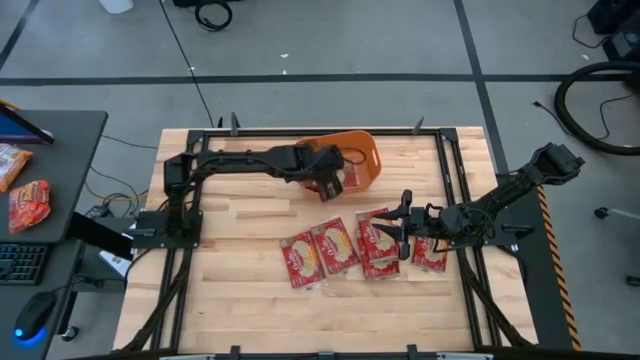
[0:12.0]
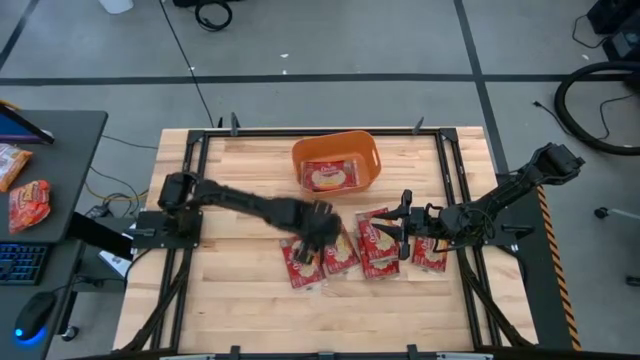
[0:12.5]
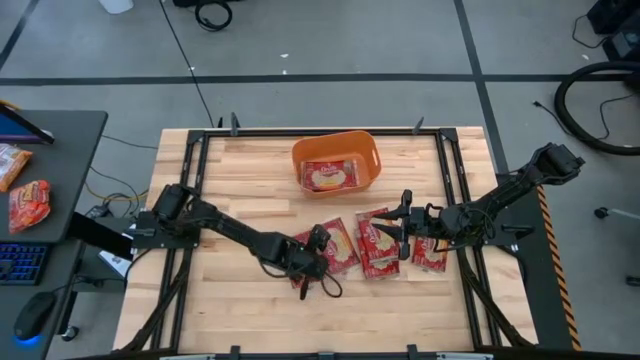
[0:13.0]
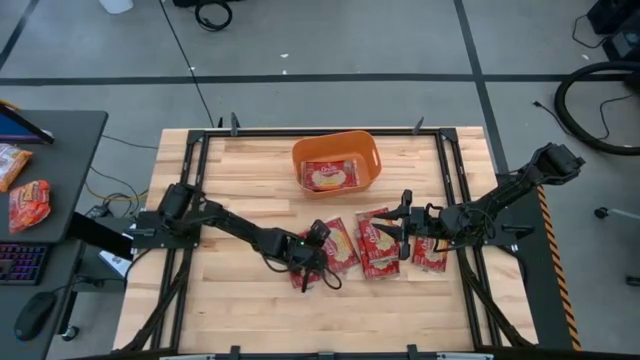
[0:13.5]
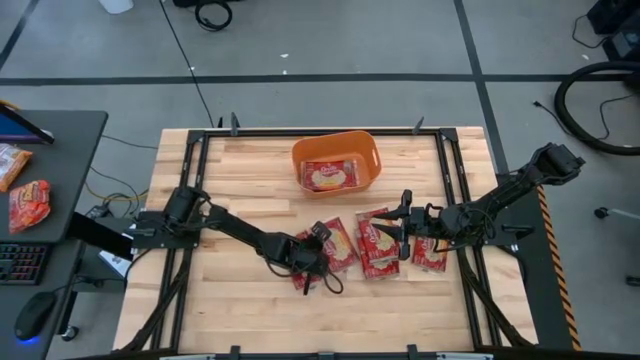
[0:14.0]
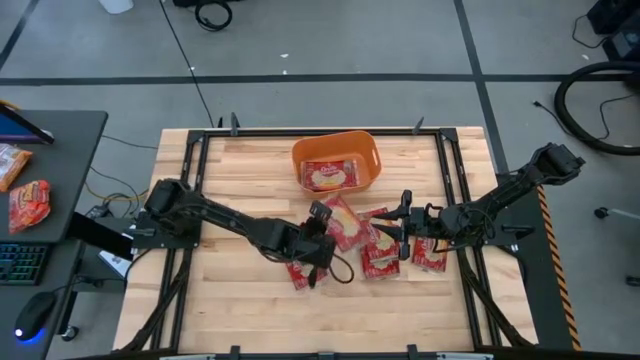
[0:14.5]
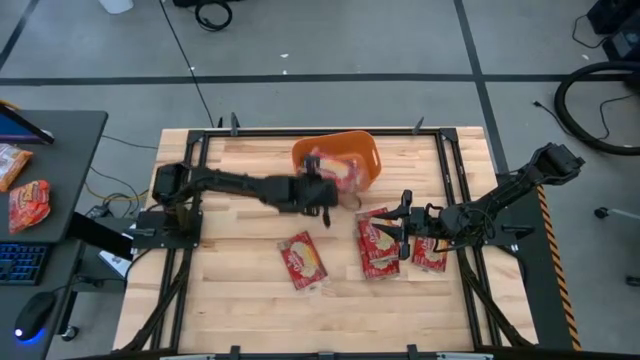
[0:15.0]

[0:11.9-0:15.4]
Task: Sort popcorn bags into baskets
Put the red popcorn bag into the orange bin

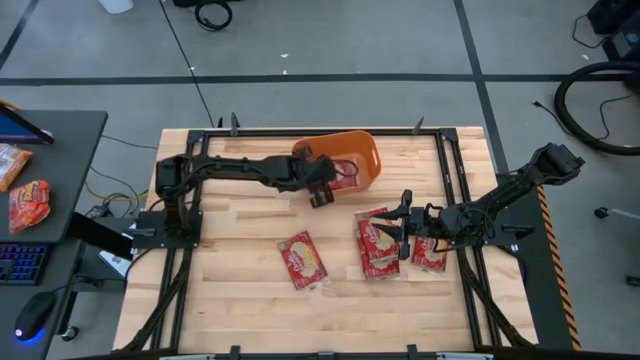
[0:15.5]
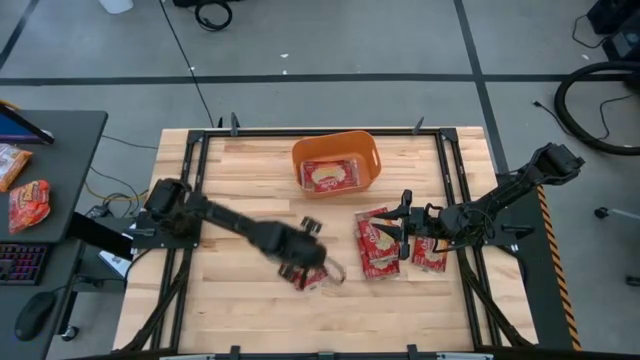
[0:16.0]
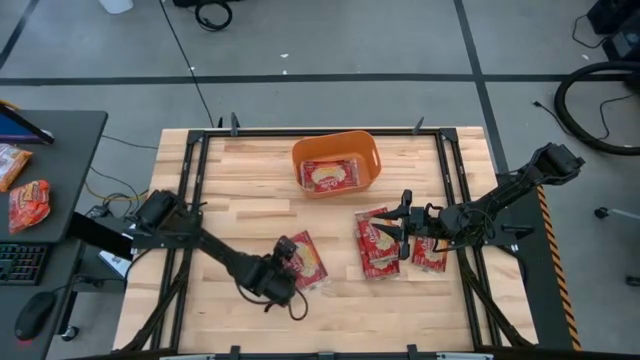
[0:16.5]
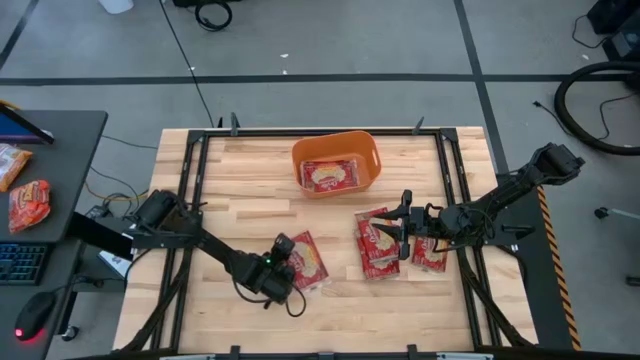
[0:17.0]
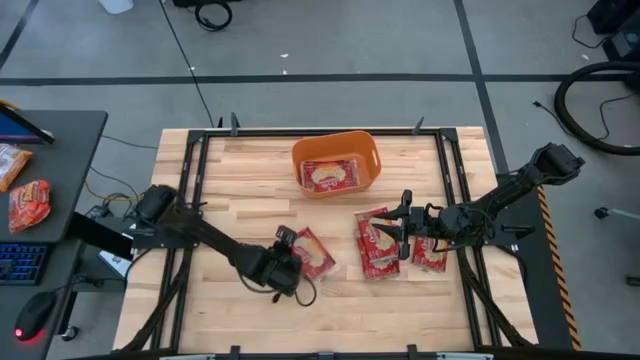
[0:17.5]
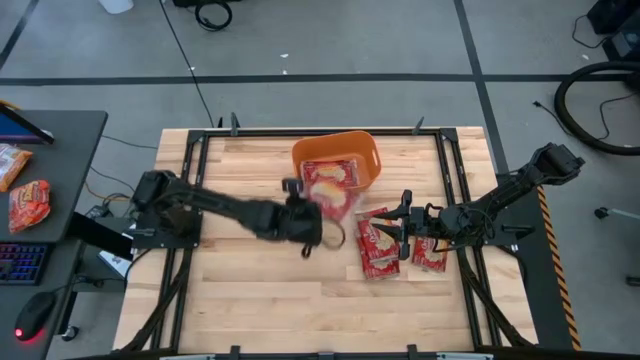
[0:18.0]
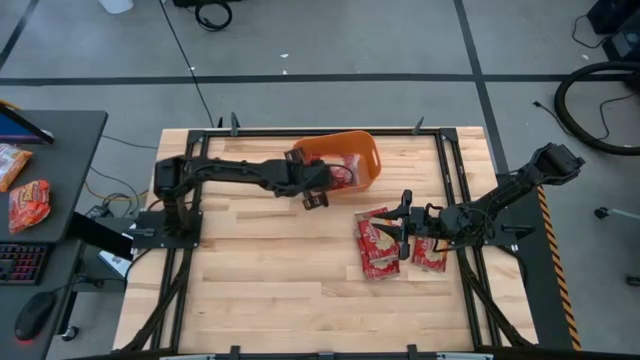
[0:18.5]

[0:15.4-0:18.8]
Put the red popcorn bag into the orange bin

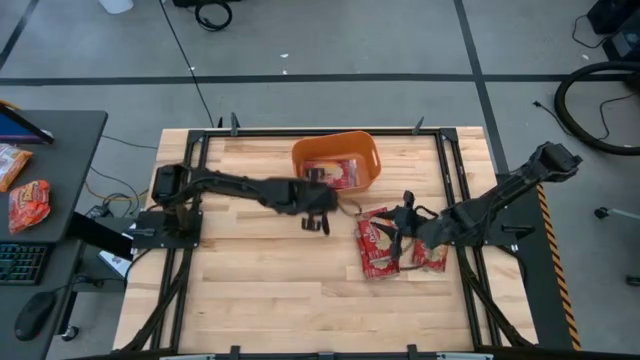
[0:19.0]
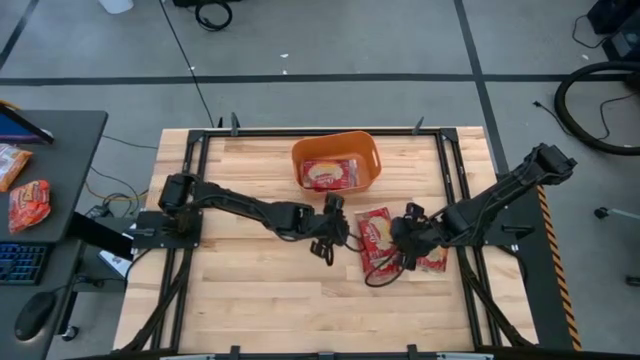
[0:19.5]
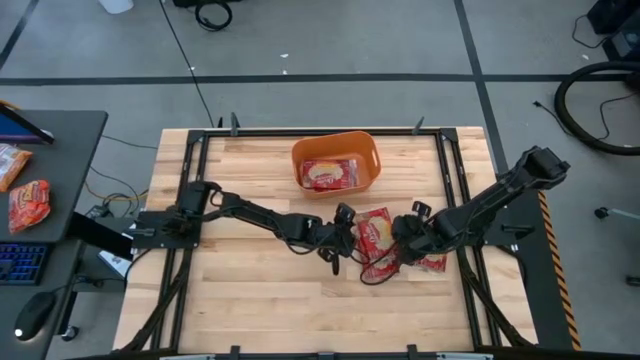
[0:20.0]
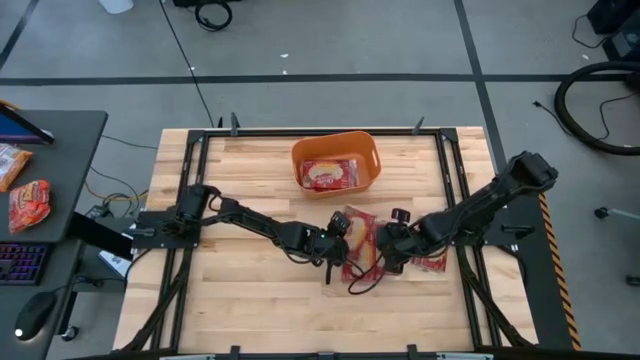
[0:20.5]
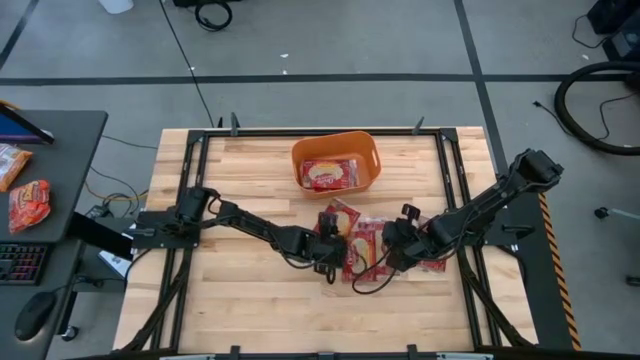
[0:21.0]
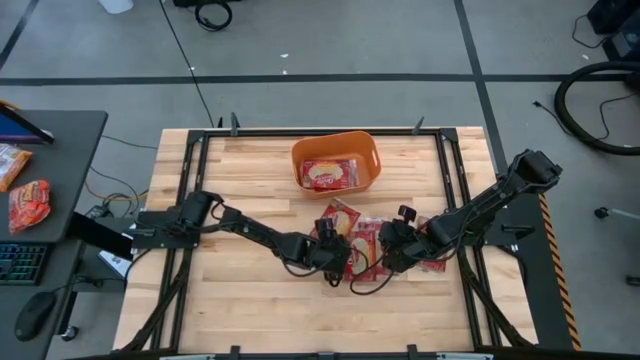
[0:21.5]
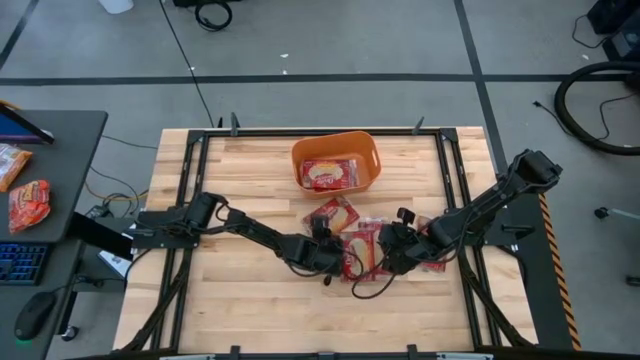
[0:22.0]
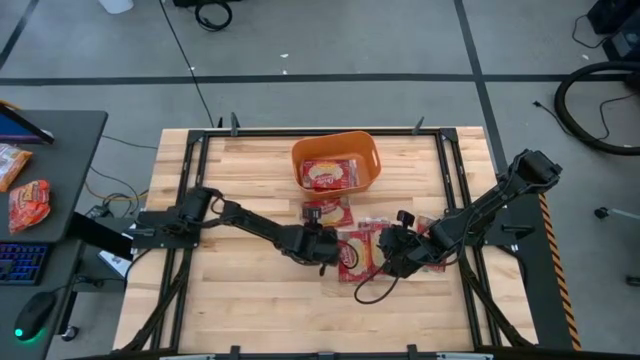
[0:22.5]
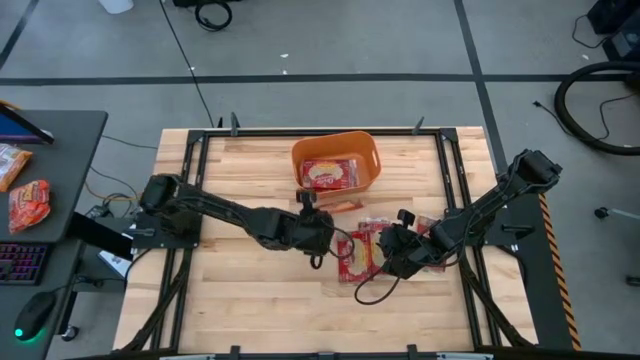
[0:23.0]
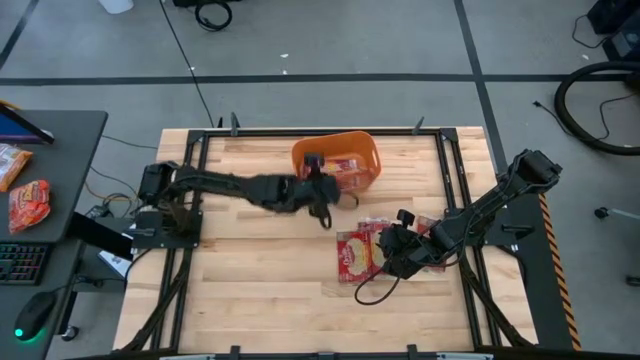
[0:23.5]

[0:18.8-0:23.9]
Put the red popcorn bag into the orange bin

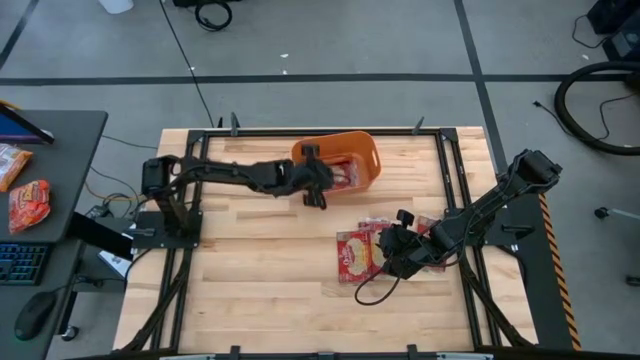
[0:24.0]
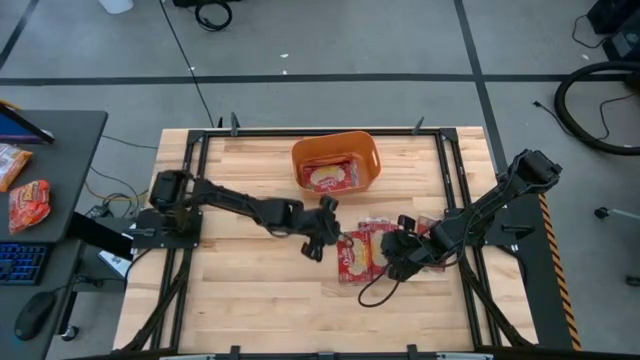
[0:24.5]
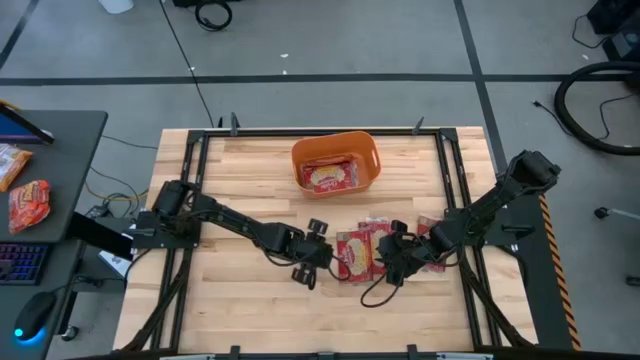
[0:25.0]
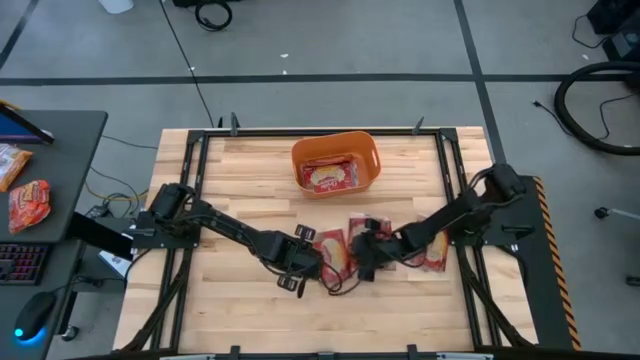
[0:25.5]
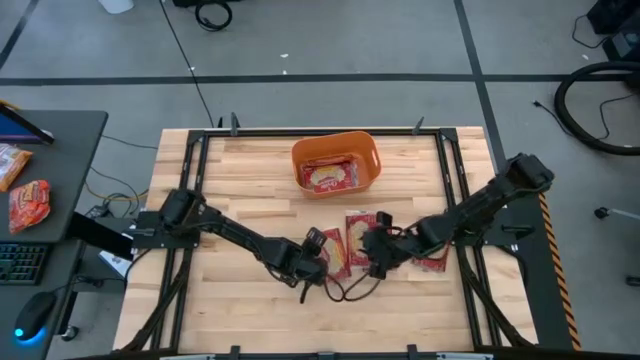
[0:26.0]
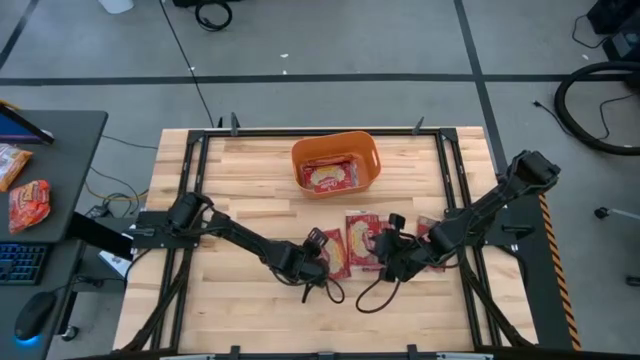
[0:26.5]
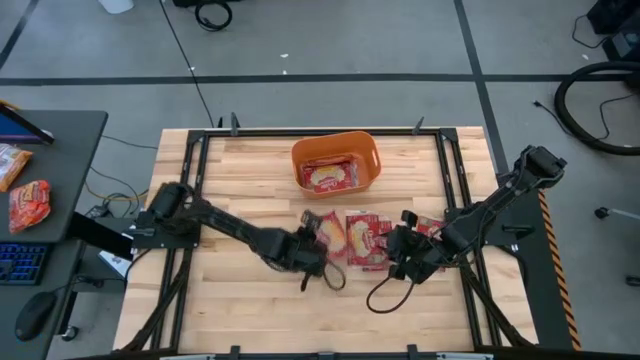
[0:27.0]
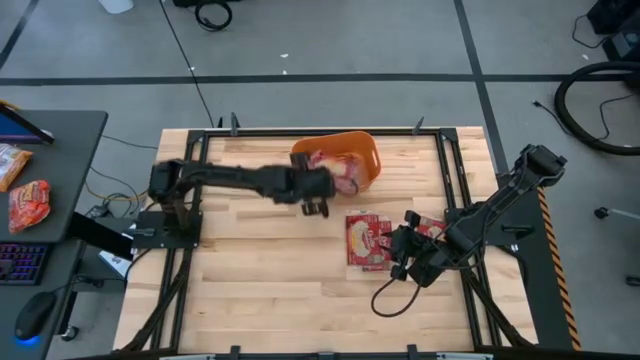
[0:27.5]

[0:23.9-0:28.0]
Put the red popcorn bag into the orange bin

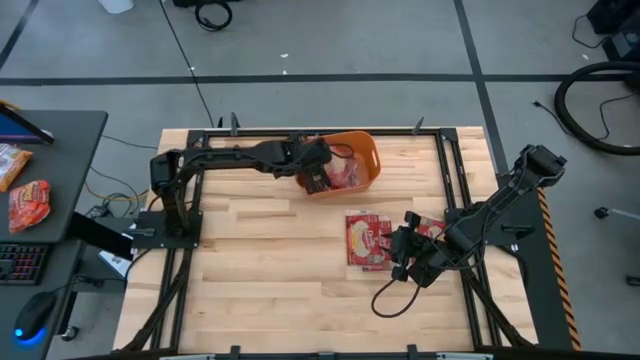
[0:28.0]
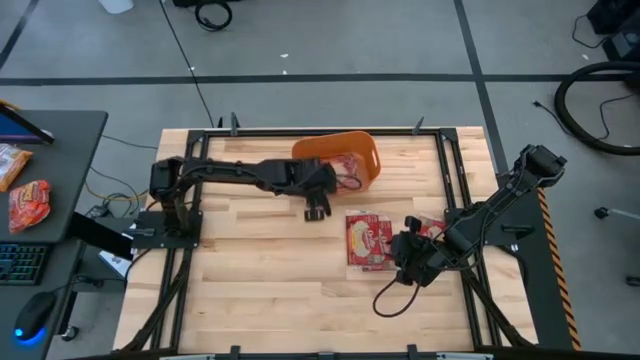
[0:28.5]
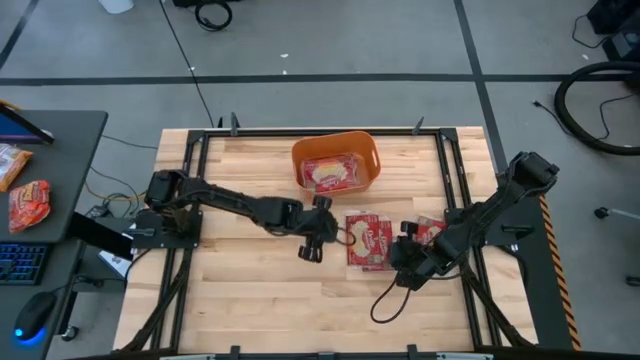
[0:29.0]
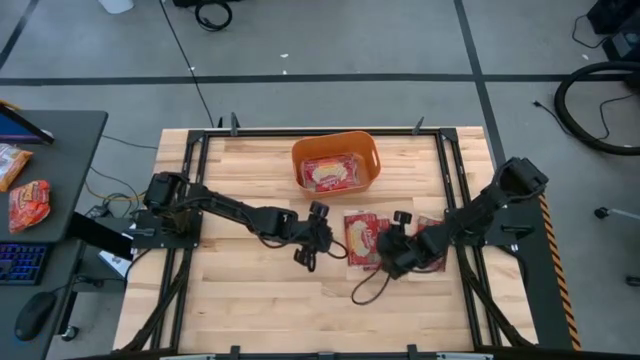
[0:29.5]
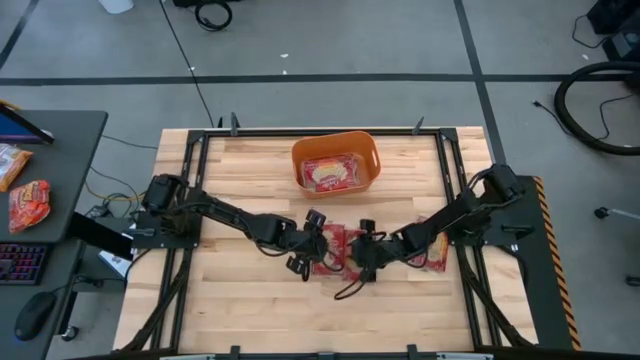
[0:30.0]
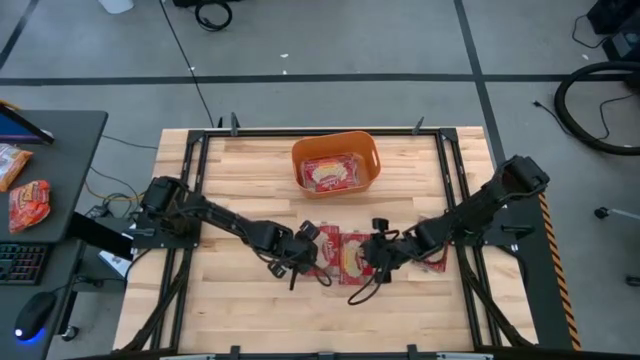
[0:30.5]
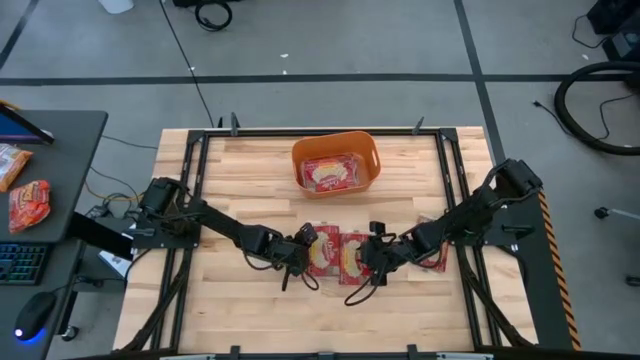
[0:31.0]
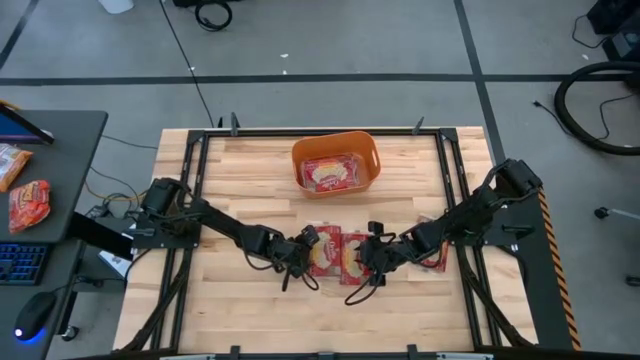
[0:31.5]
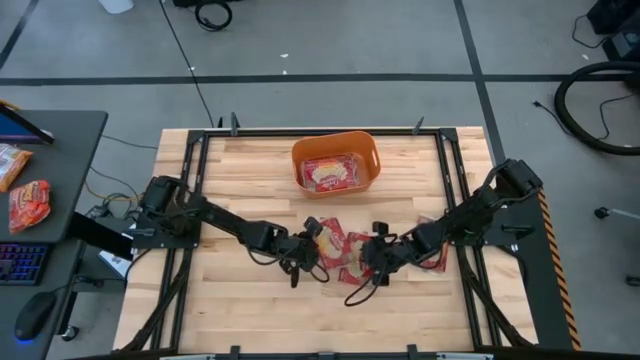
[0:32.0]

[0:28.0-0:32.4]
Put the red popcorn bag into the orange bin

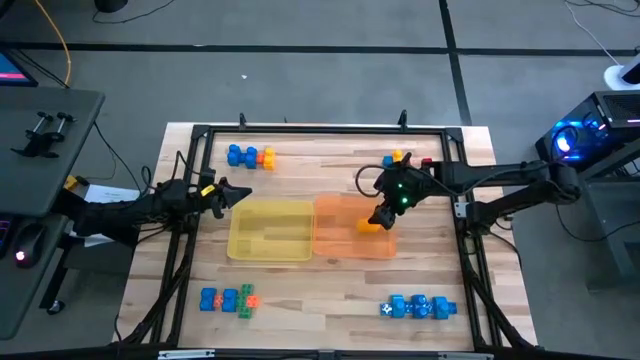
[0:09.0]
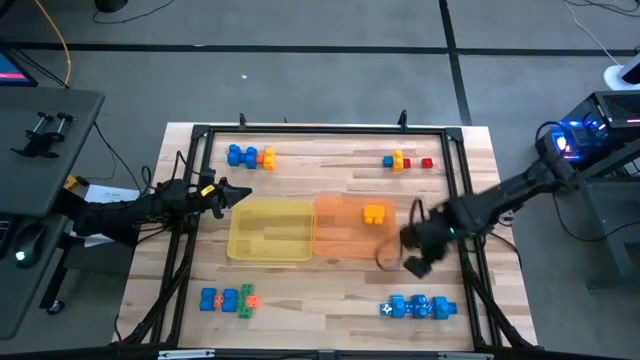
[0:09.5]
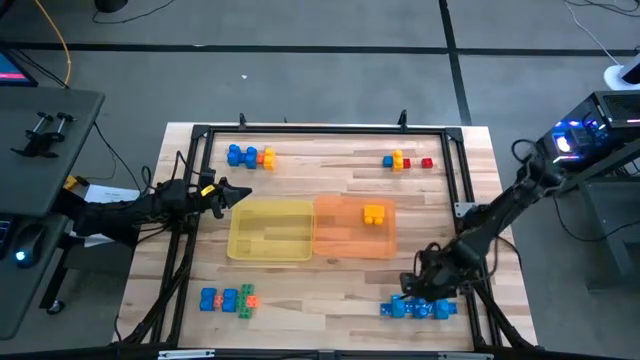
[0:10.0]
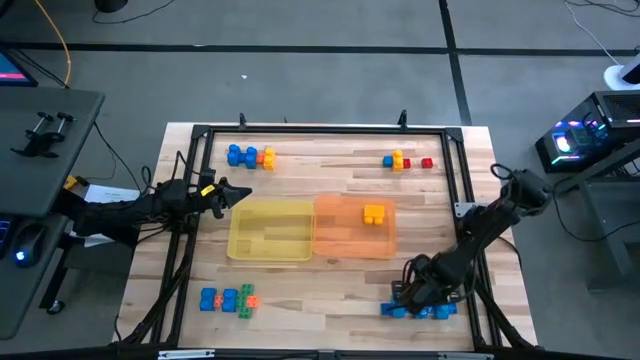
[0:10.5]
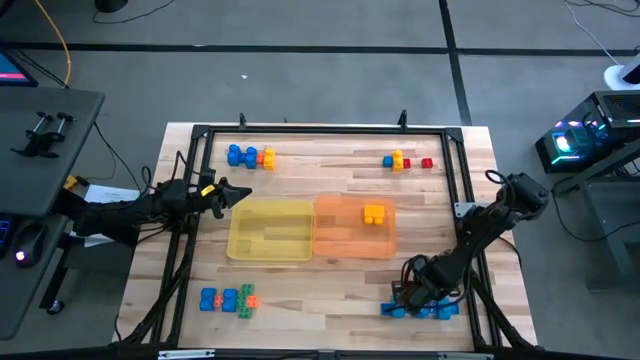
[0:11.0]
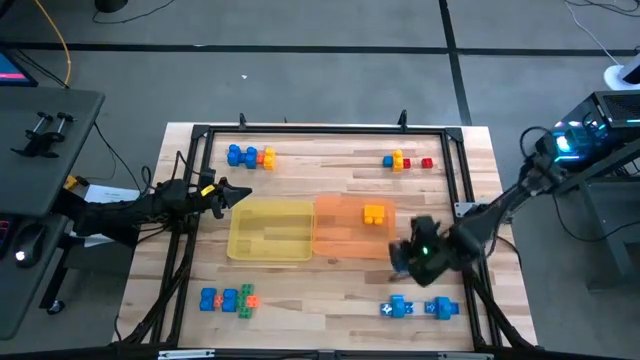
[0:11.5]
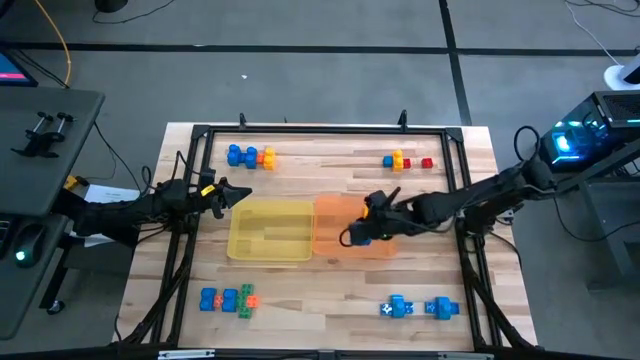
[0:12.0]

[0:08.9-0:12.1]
Task: Sort blocks by size
Put the large blue game piece into the orange bin
